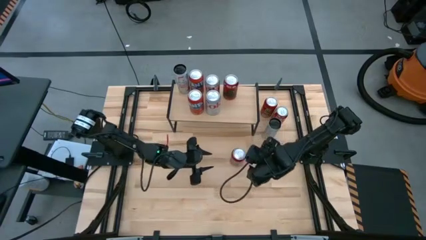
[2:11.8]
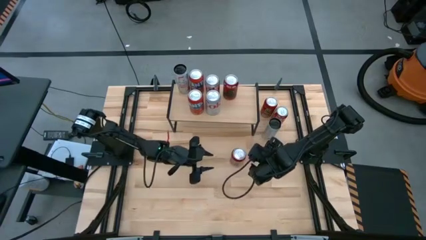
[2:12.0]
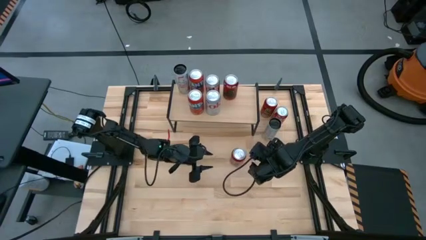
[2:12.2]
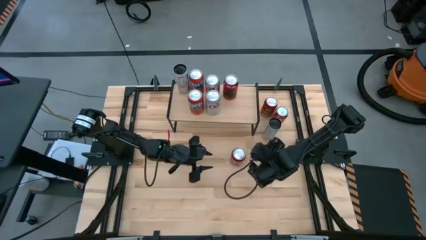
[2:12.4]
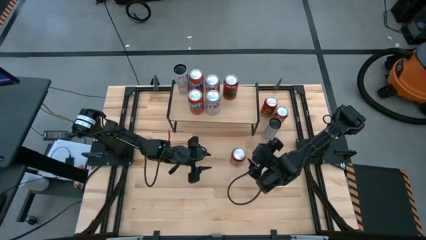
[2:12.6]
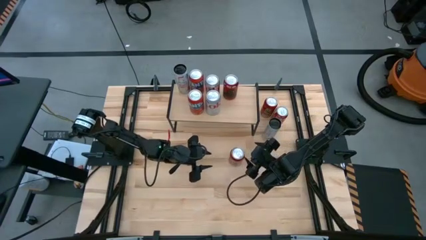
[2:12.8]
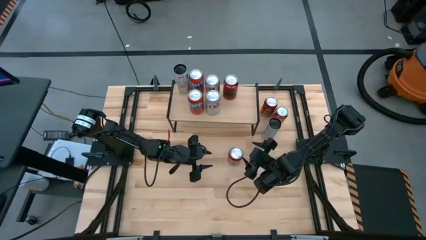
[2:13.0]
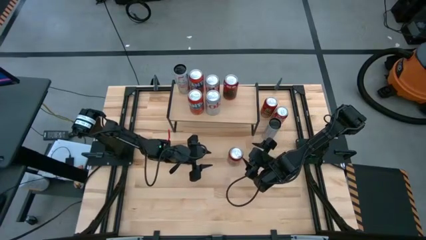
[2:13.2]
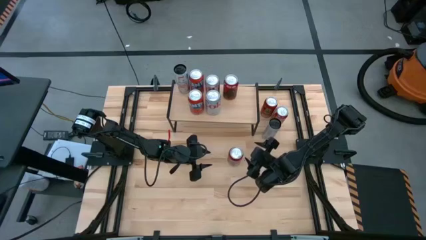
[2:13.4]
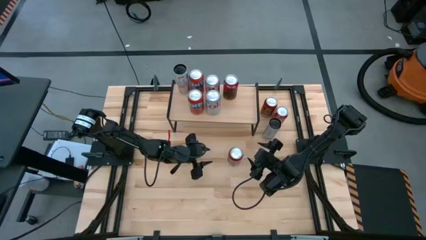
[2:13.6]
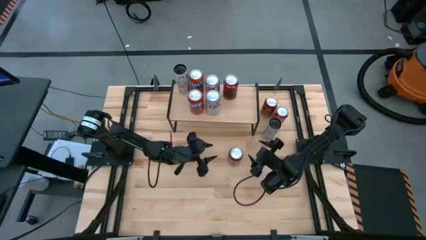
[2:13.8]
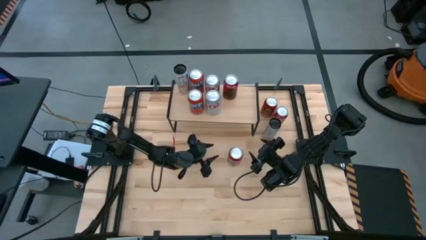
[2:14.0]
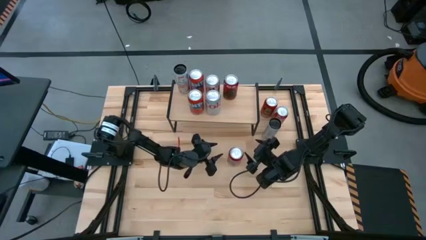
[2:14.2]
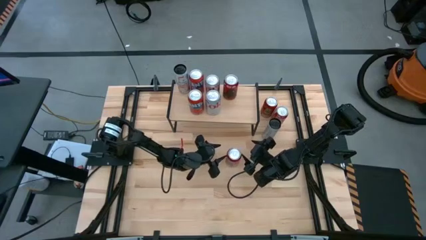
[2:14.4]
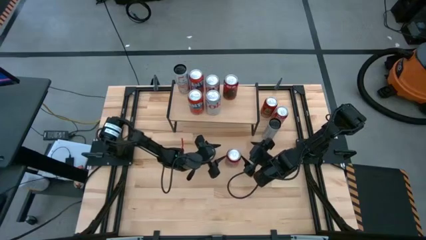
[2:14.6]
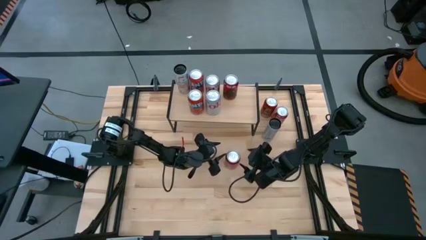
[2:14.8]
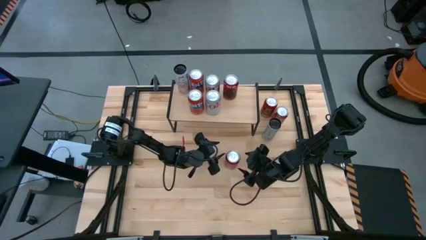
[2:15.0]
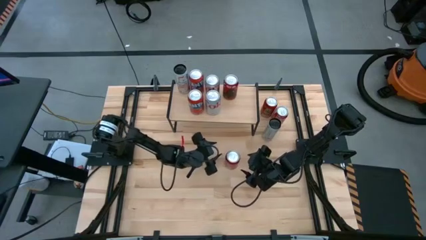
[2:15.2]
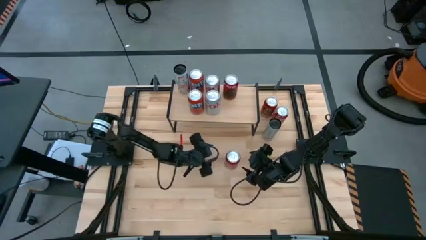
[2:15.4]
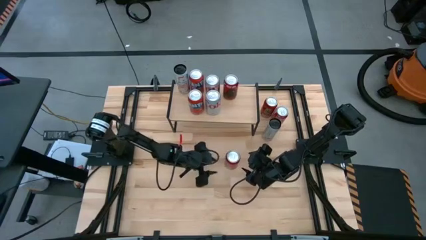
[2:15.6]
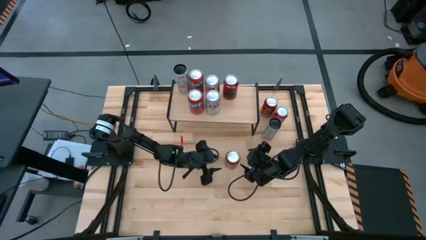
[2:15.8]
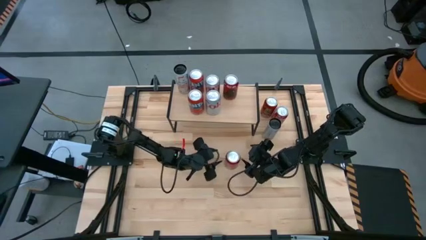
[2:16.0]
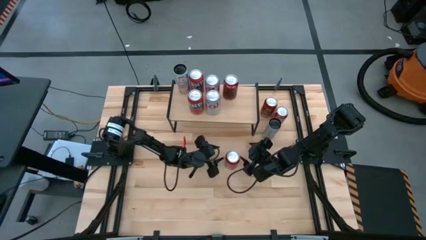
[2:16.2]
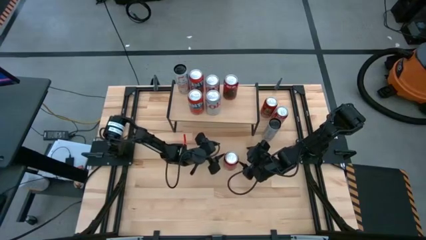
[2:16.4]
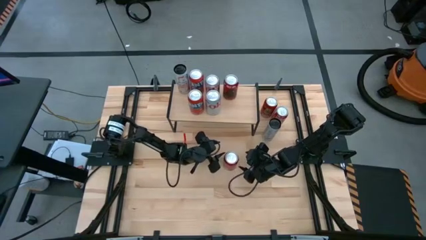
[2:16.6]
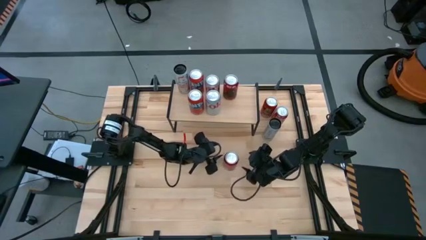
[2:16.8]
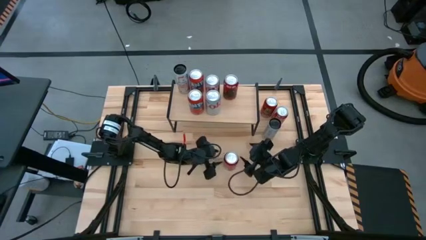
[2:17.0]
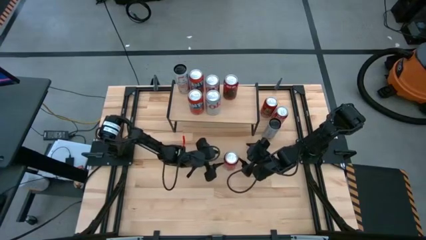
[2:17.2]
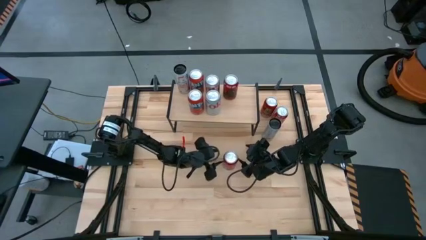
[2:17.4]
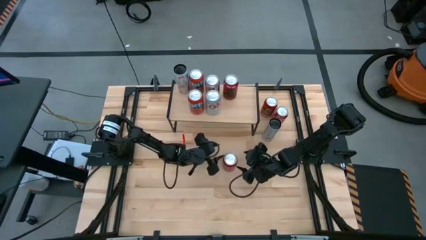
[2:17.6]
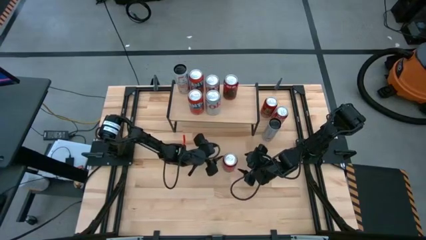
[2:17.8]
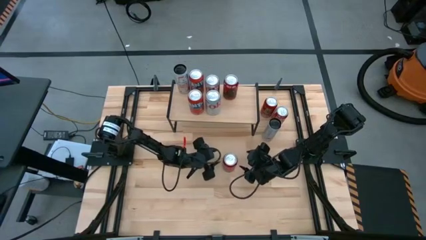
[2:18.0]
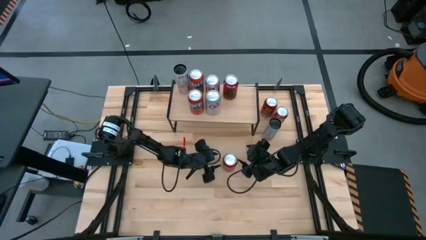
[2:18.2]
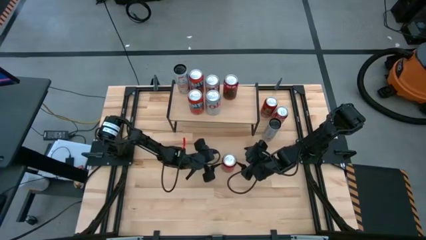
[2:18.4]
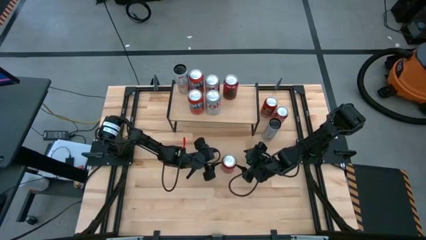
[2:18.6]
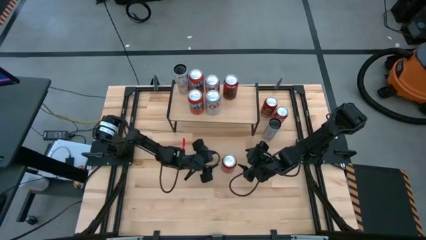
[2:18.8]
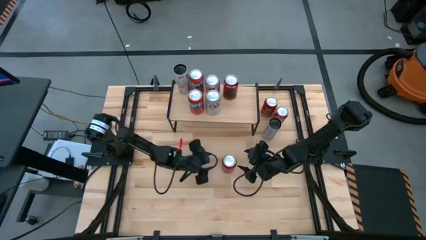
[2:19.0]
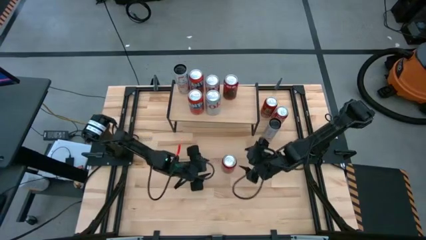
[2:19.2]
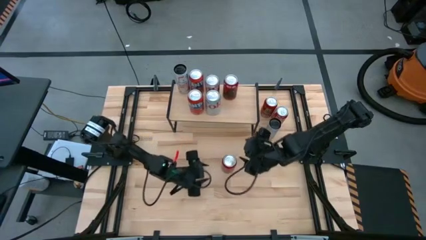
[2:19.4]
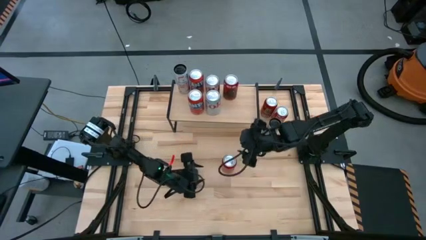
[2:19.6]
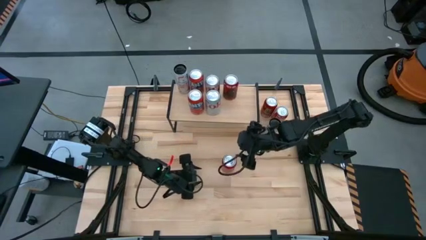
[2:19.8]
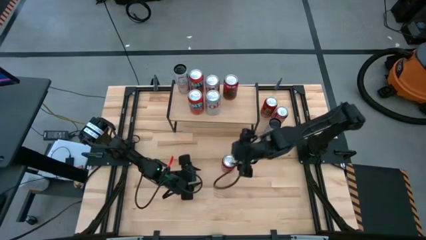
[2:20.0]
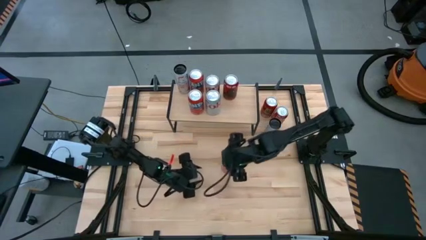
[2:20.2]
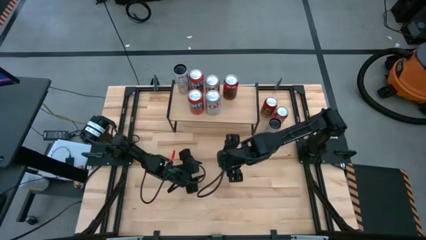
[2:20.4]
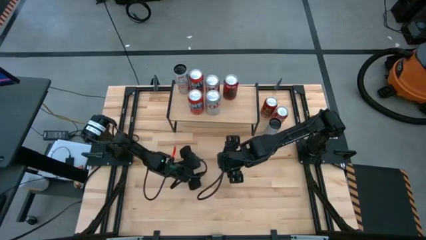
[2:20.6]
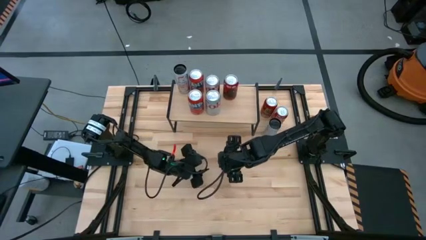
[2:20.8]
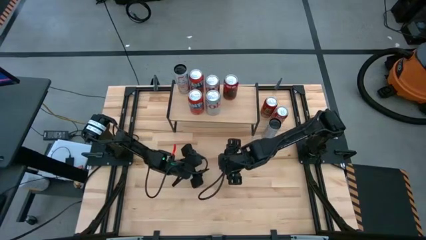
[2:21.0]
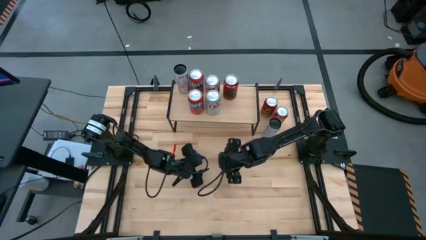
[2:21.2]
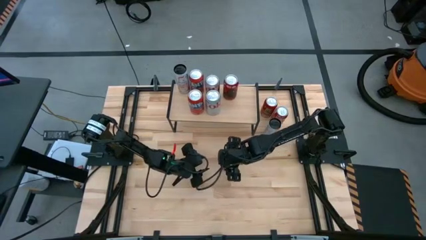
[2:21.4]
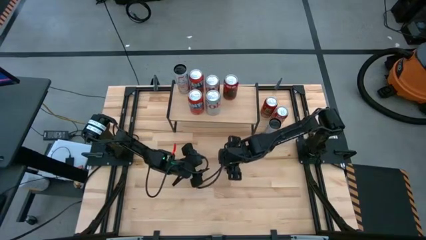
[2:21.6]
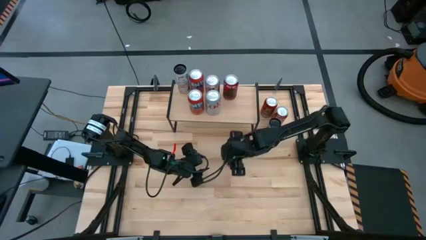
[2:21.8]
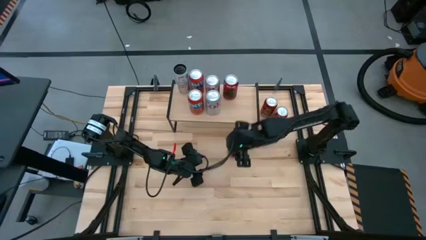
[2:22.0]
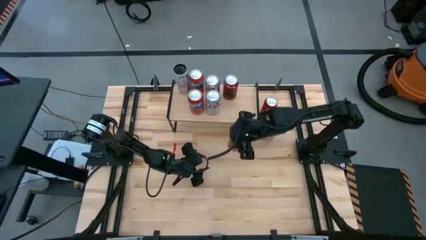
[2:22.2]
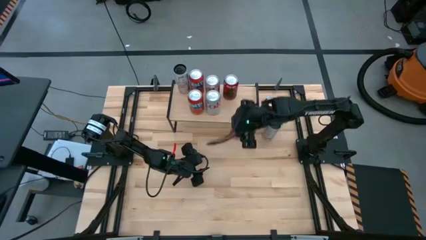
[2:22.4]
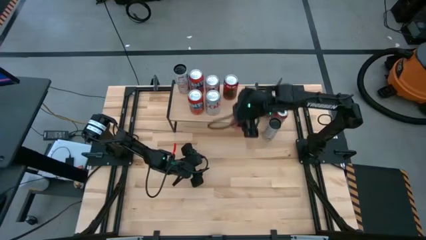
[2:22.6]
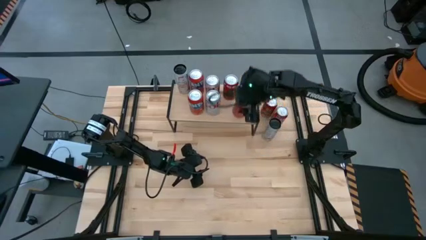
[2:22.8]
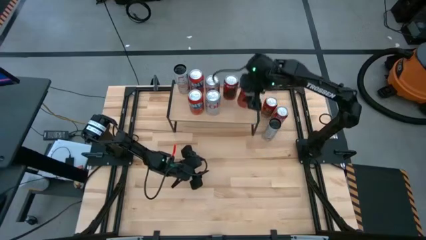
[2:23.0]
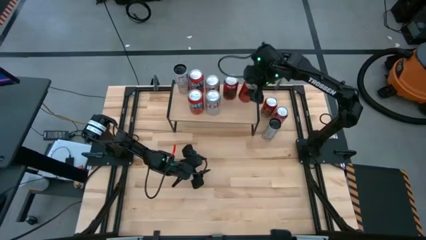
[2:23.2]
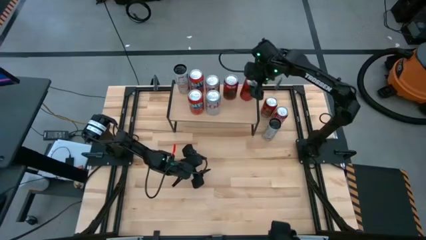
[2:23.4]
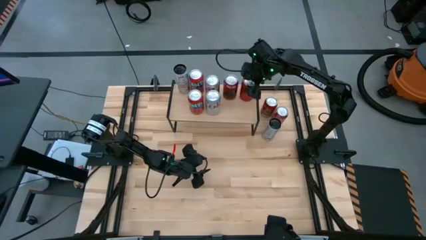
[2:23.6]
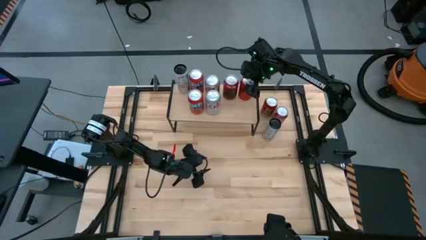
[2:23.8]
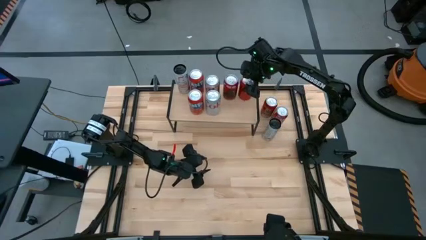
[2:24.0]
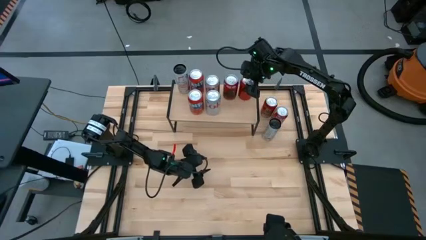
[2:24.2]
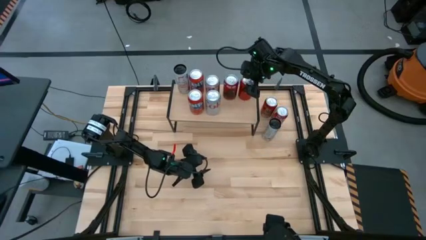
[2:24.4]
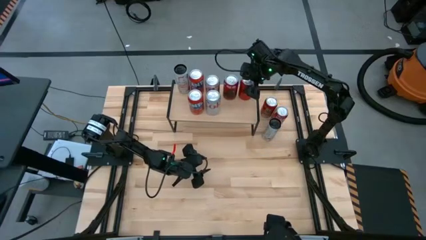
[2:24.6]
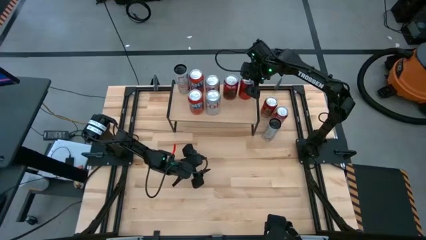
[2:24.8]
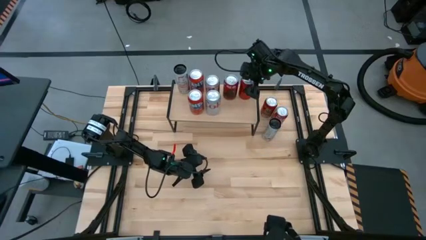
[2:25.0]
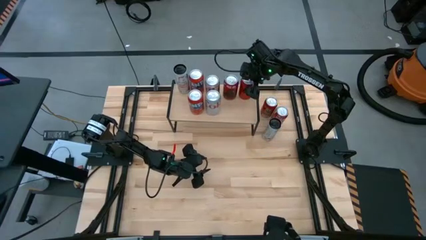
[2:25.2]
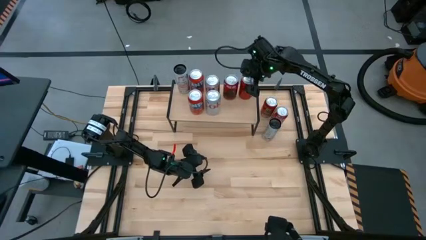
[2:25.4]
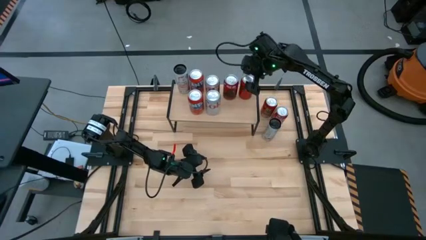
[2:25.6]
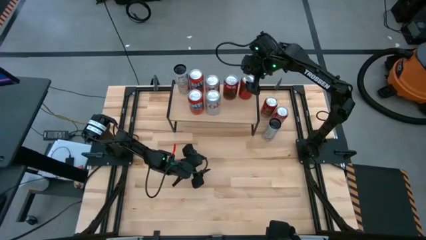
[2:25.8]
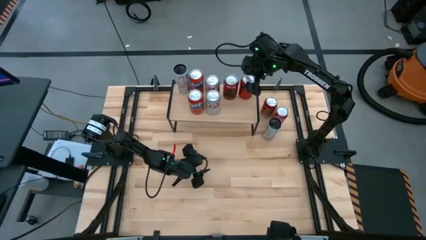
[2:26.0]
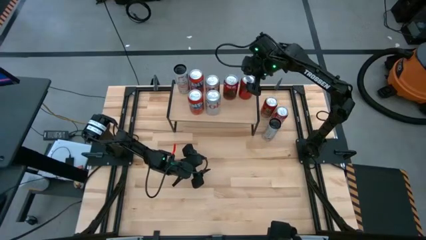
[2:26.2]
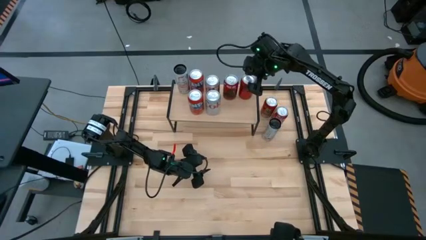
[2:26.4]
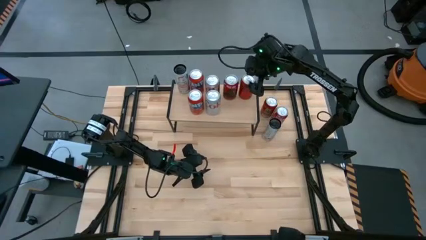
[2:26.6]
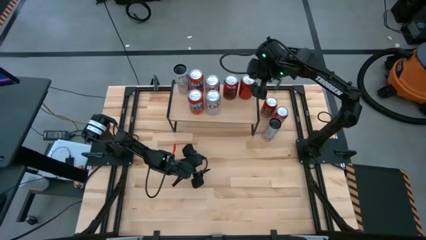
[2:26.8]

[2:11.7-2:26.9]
Task: Place canned beverage on shelf
Put the bottom red and black soda can on the shelf
